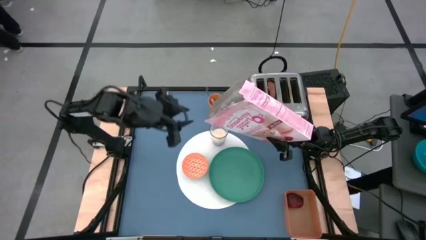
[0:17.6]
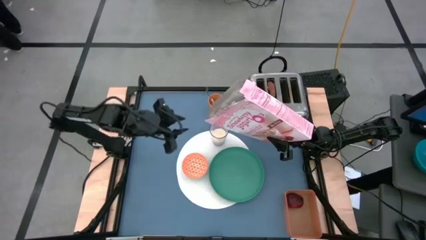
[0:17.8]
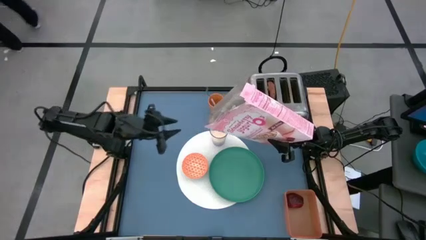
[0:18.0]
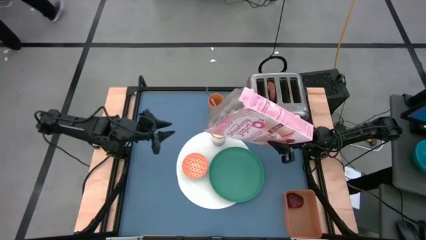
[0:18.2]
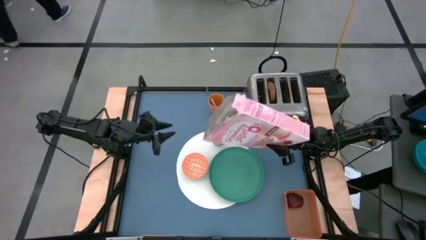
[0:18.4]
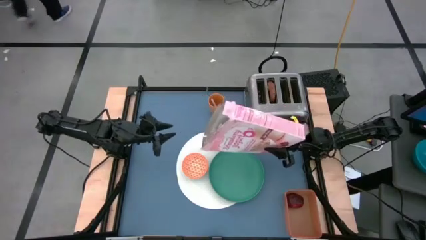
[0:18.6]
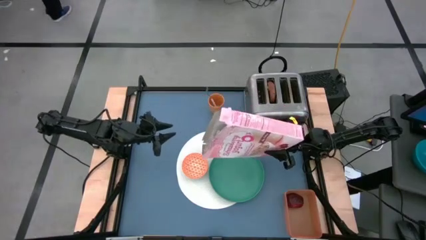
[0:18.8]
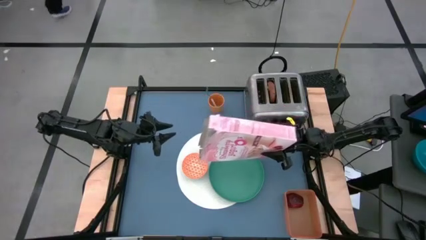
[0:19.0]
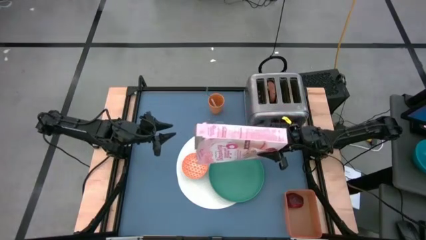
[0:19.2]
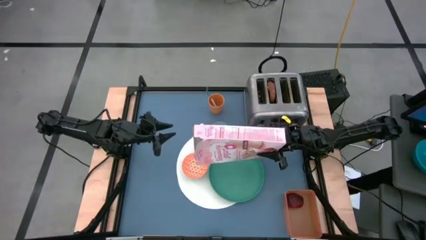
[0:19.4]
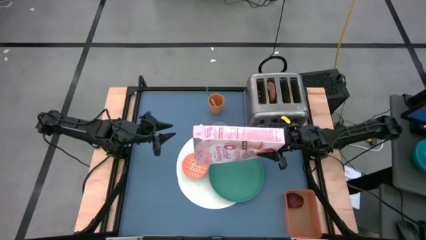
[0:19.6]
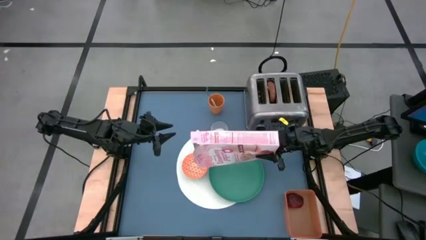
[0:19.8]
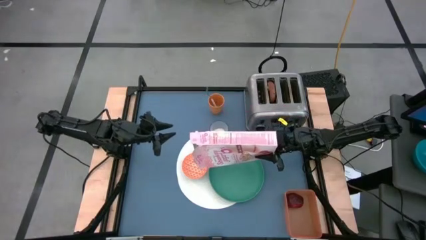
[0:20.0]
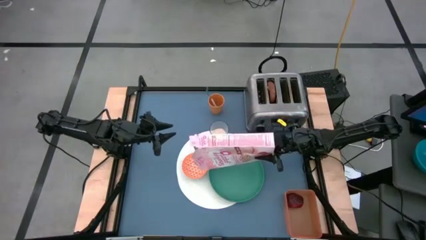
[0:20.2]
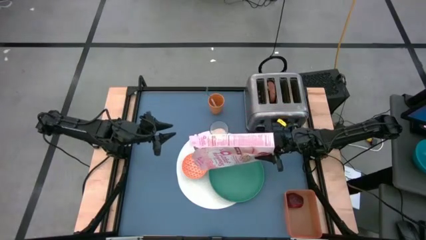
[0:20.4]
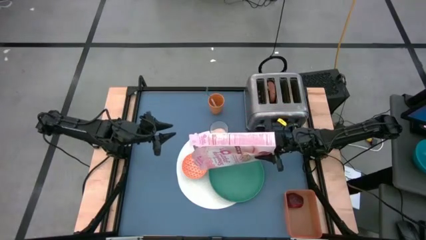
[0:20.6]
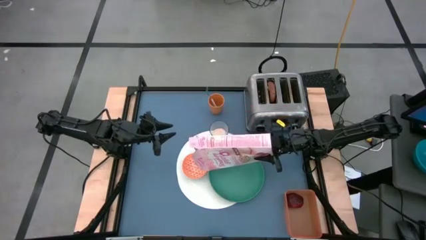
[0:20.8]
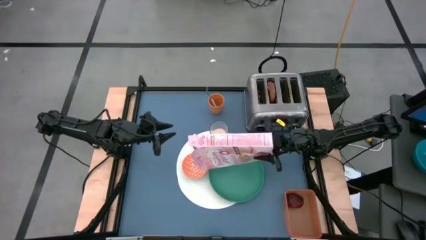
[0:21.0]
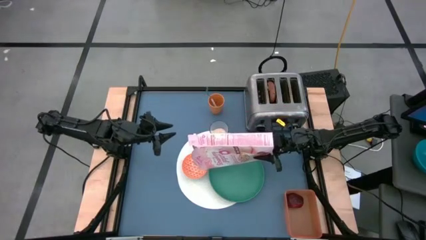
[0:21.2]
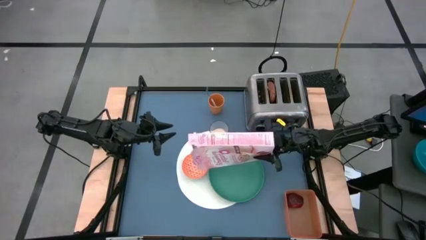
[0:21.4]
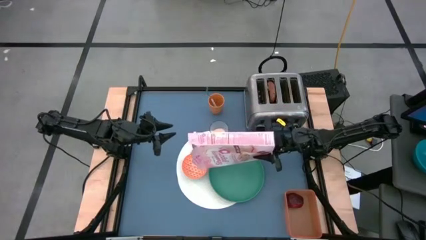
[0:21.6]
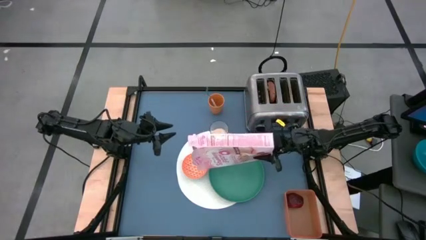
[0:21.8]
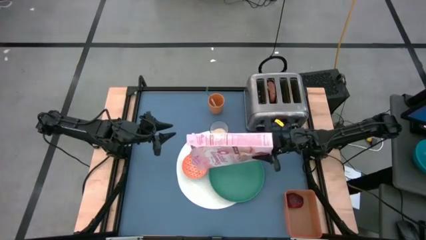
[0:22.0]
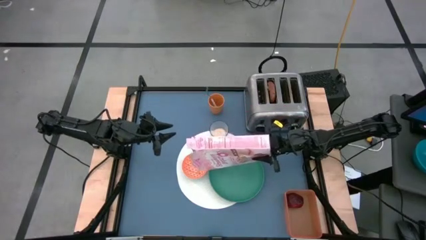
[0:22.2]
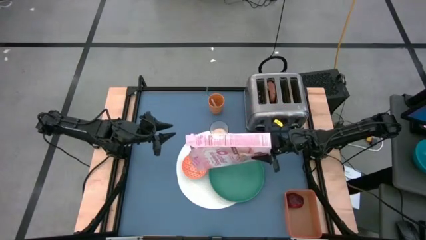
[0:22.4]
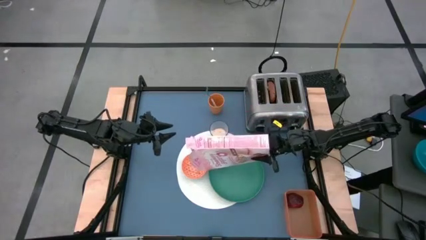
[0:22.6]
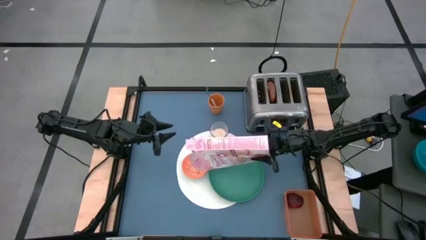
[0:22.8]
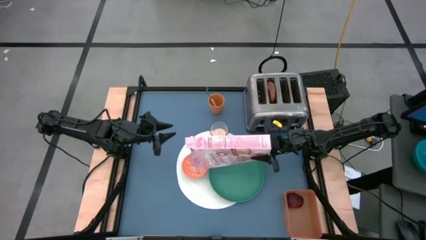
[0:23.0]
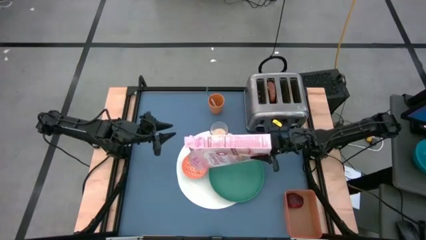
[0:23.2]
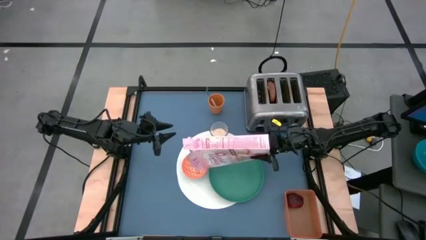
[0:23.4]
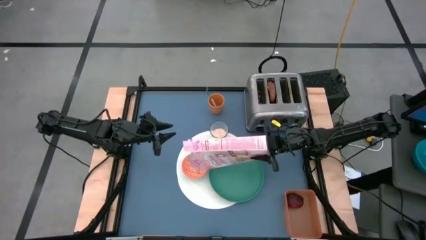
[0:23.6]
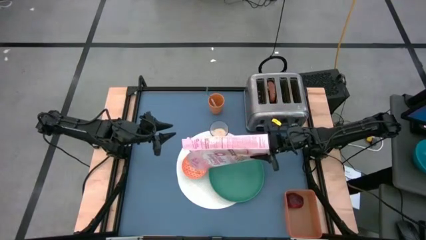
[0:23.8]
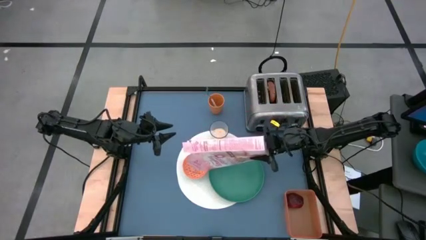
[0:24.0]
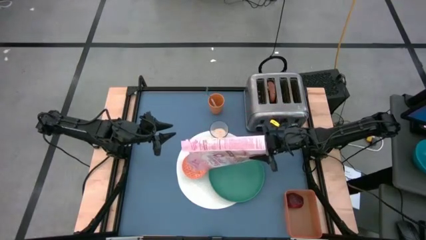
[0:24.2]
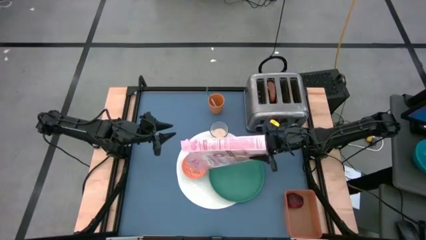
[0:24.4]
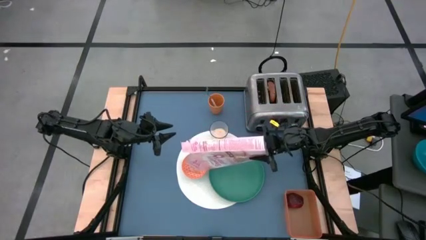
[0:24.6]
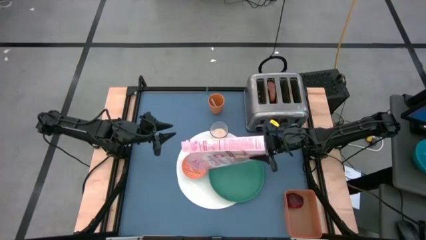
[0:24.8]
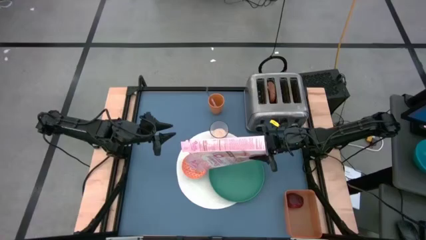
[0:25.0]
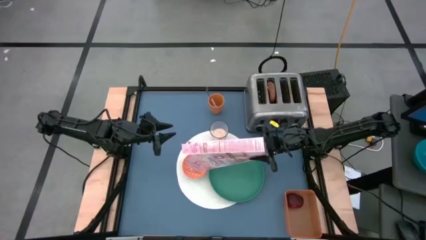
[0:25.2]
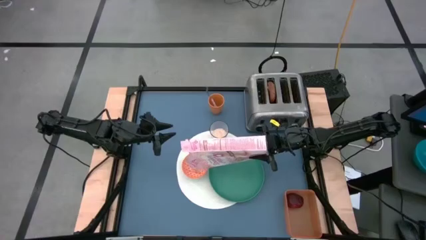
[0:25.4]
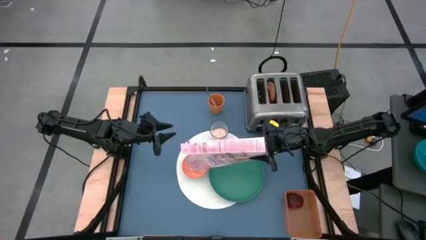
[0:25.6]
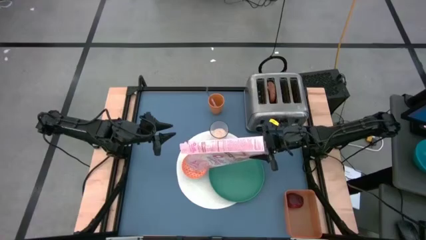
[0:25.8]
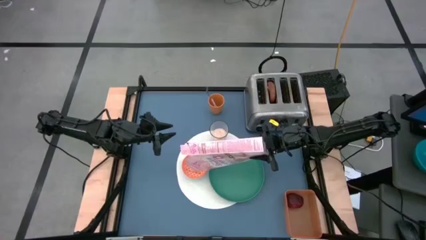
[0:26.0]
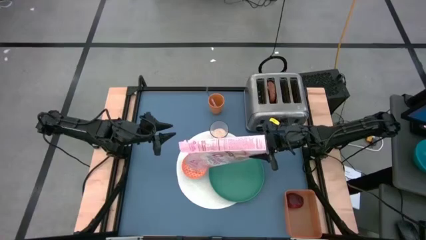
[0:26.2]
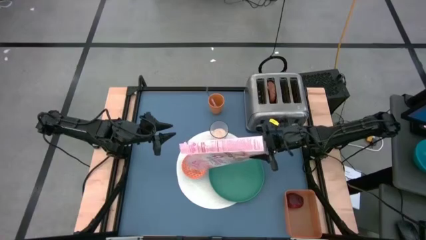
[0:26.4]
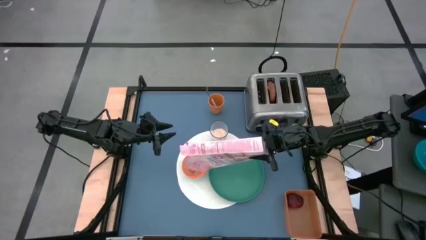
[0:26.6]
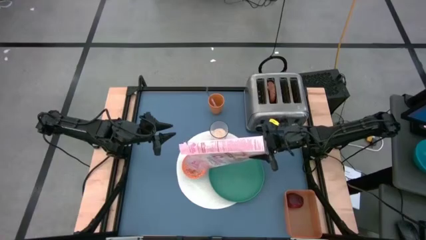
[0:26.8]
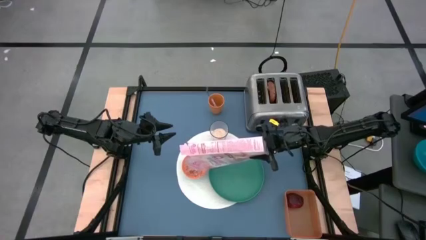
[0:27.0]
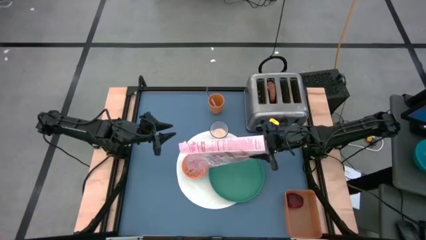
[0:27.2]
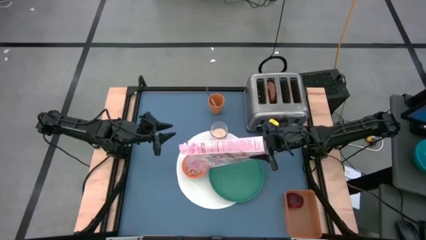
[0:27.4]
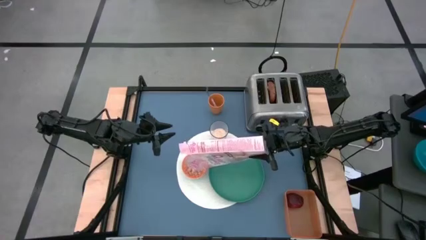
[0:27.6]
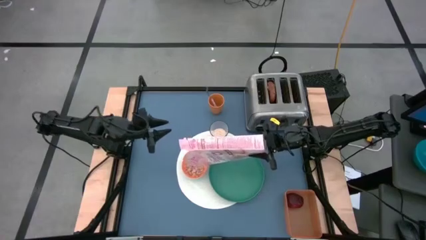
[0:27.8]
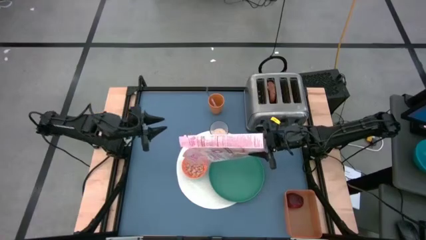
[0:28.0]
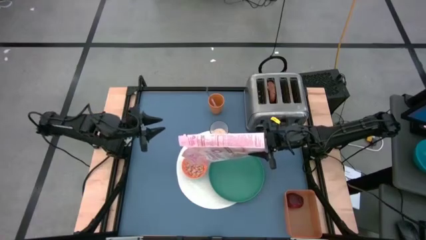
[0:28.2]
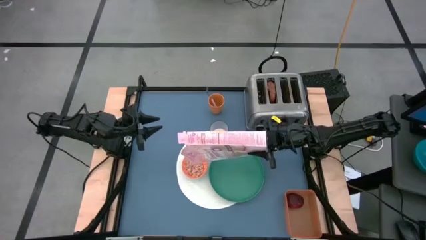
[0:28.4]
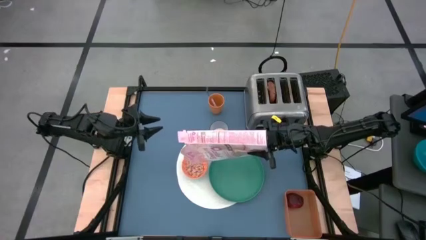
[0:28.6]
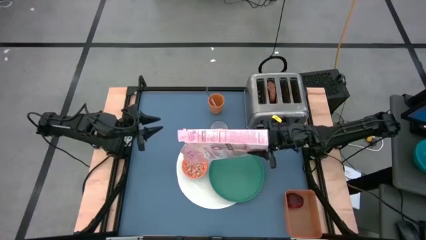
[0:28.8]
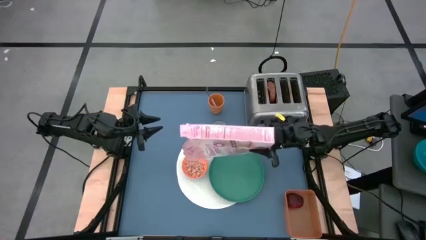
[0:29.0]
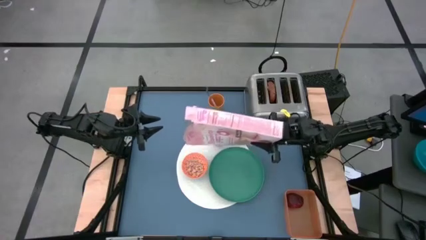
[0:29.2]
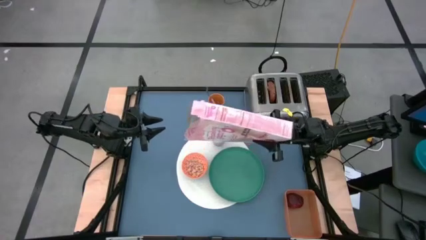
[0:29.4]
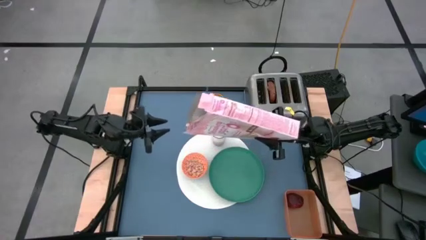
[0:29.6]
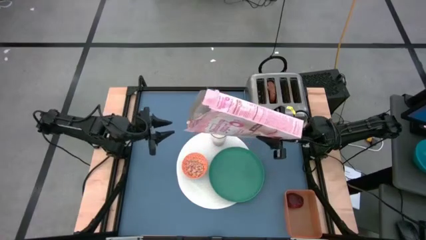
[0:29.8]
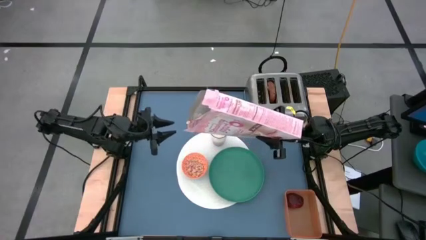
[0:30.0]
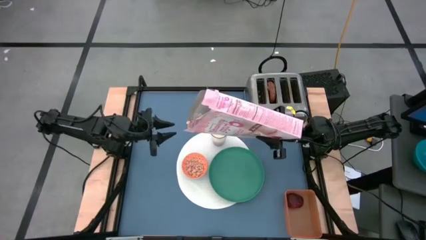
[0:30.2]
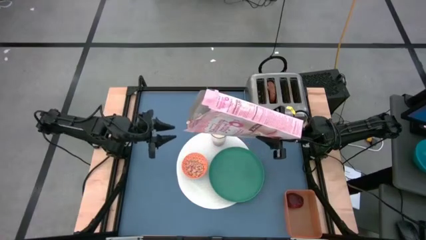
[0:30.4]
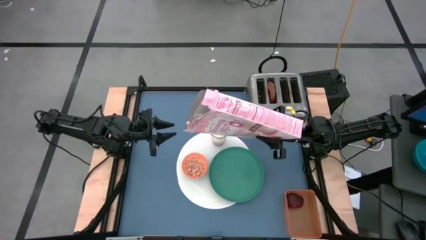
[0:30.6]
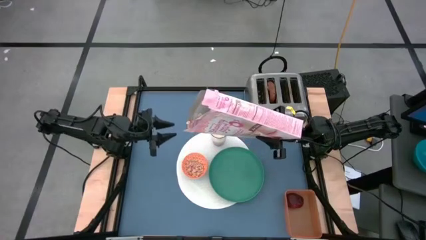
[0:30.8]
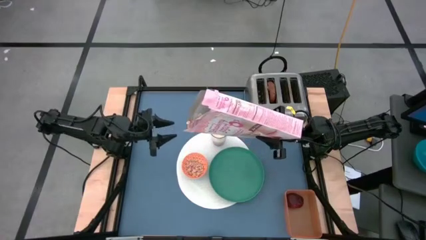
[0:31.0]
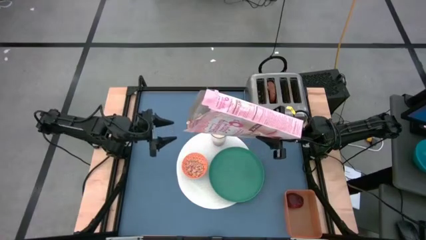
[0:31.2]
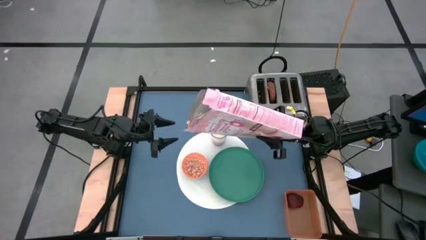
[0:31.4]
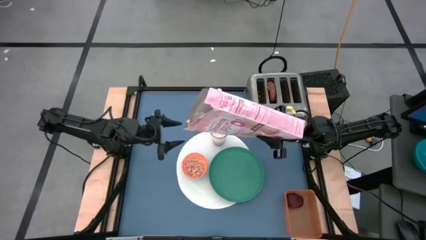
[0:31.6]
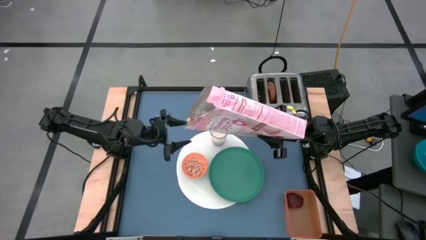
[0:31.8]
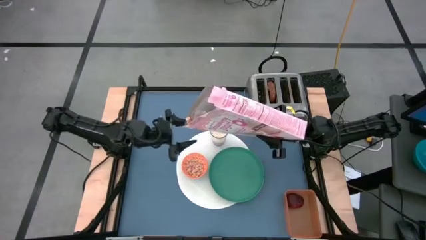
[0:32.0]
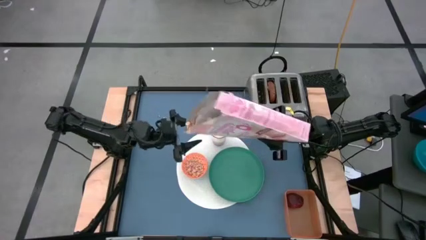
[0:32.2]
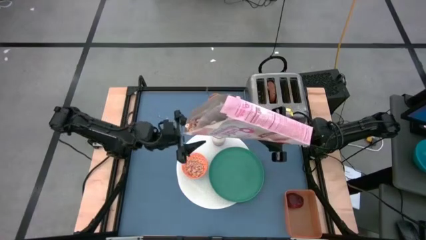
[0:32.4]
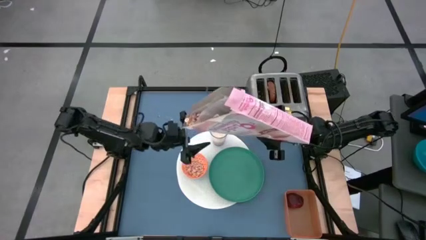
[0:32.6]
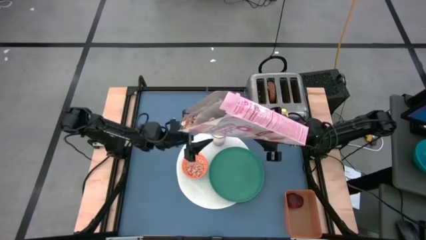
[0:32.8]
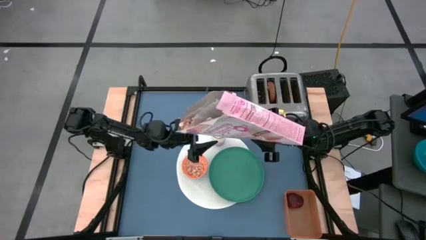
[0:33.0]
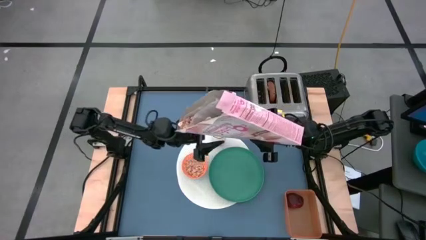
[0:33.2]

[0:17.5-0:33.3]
Task: Arrange a breakfast setting
Pour the cereal from the cereal box into the orange bowl

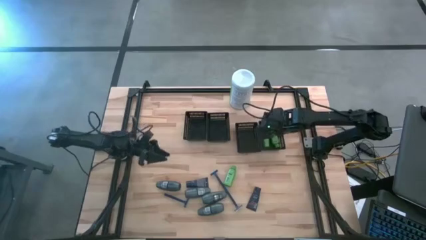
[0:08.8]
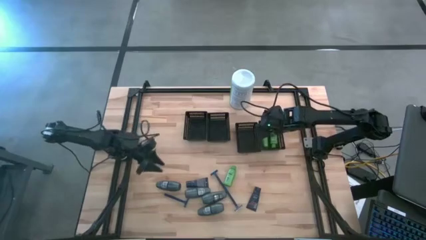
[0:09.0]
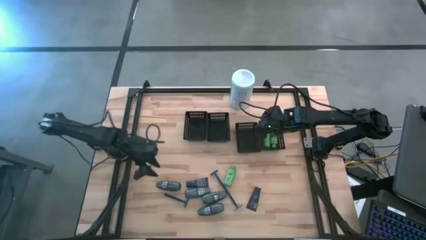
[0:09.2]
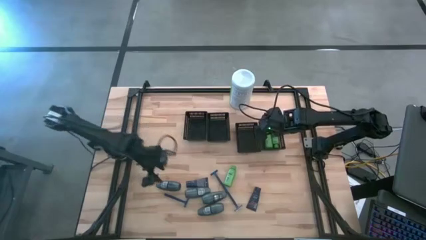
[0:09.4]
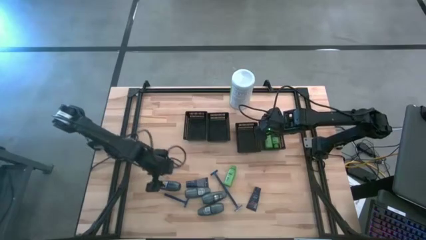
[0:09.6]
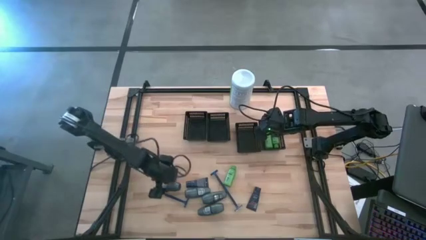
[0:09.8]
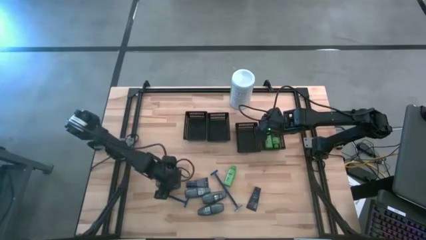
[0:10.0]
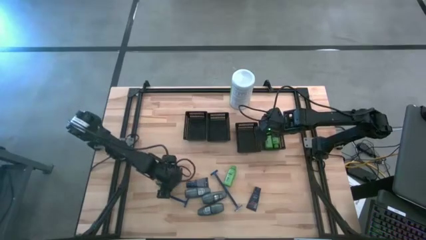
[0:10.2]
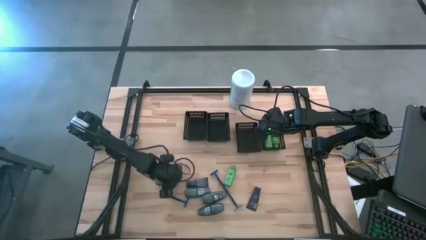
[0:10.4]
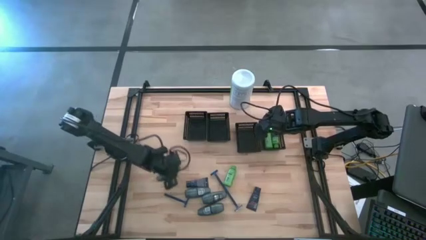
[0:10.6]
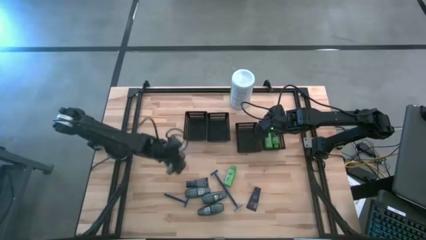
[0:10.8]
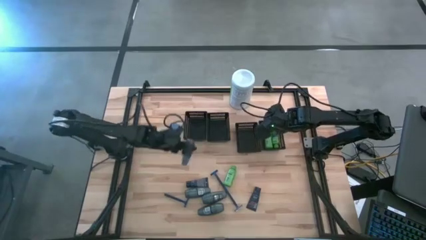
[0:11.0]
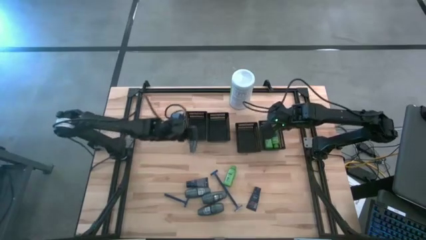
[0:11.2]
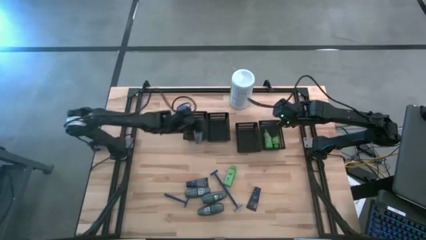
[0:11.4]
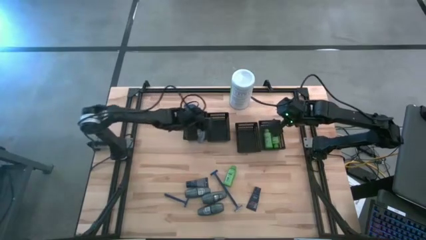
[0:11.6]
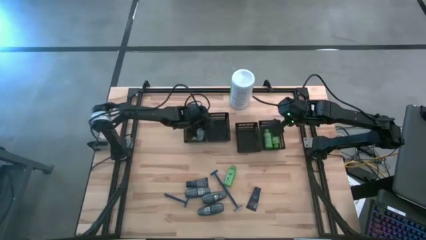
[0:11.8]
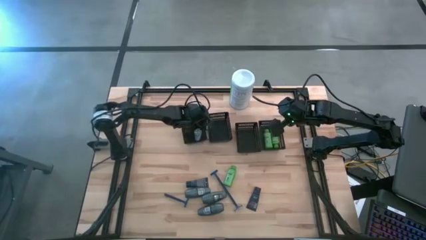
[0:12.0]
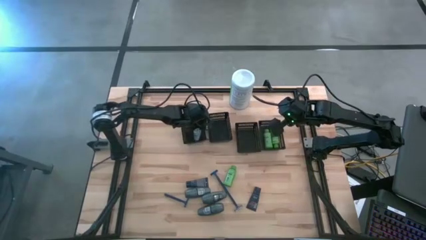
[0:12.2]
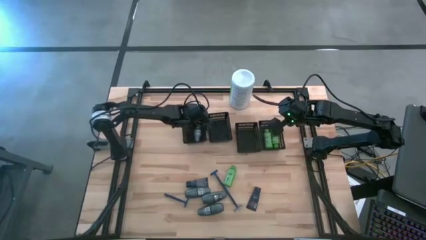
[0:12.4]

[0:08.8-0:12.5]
Task: Pick & Place Travel size toiletries
Put the black deodorant into the left black bin
